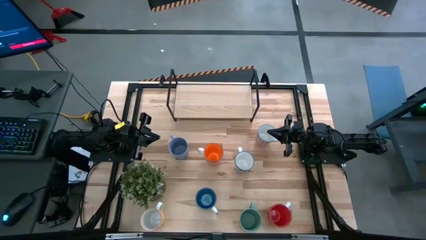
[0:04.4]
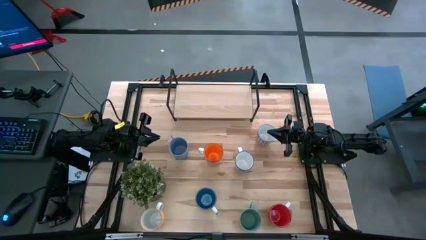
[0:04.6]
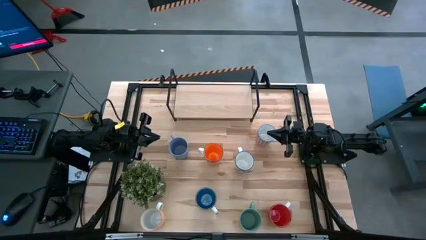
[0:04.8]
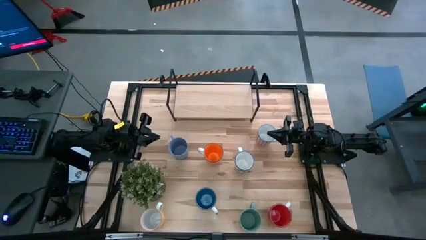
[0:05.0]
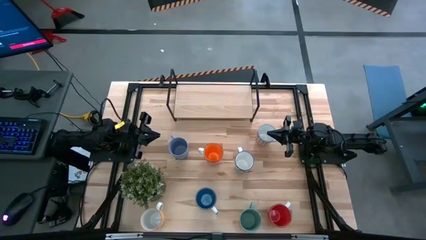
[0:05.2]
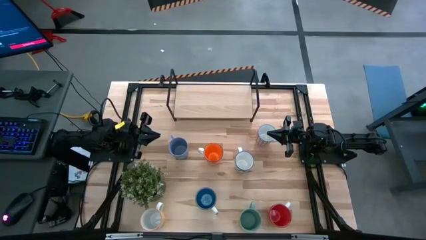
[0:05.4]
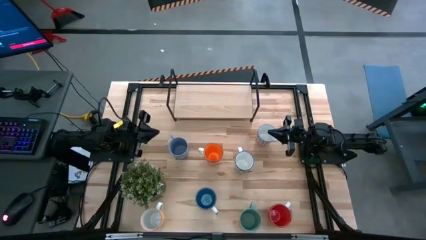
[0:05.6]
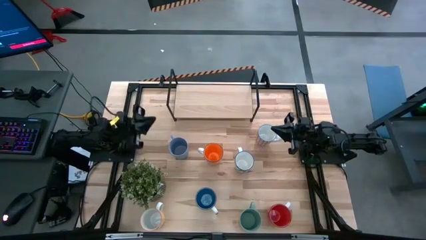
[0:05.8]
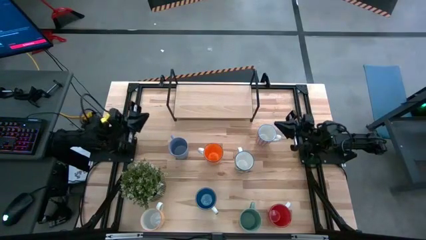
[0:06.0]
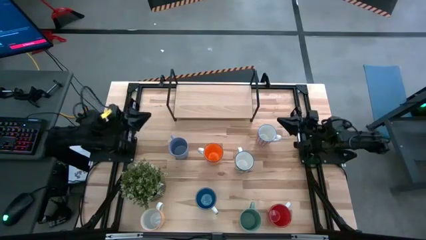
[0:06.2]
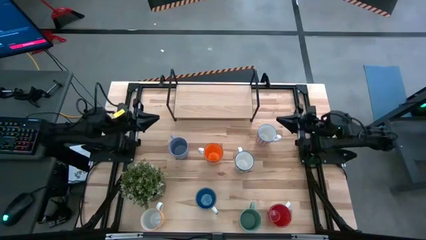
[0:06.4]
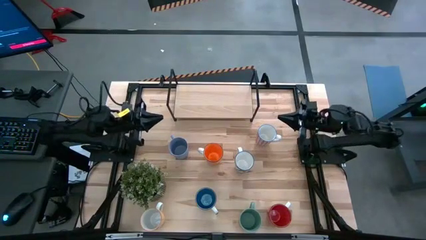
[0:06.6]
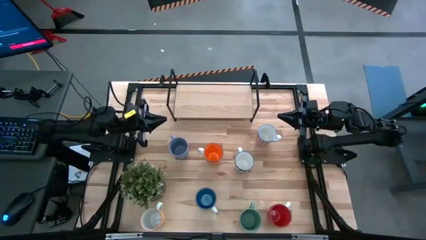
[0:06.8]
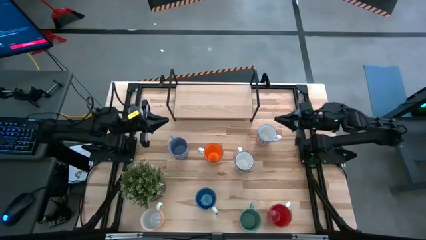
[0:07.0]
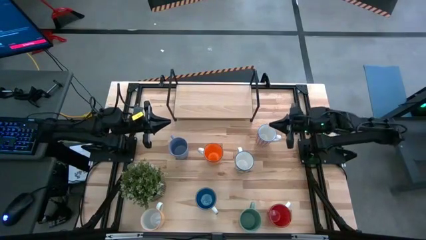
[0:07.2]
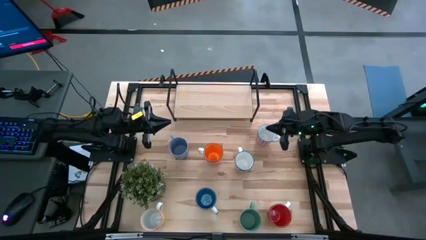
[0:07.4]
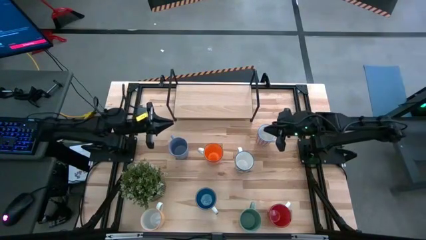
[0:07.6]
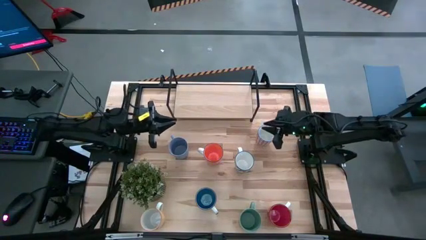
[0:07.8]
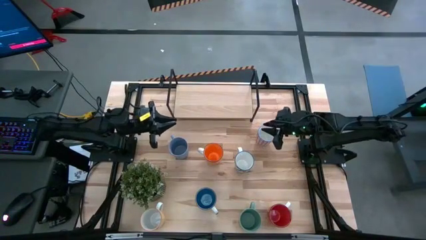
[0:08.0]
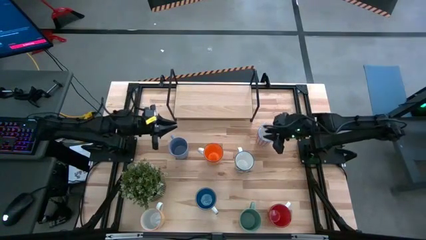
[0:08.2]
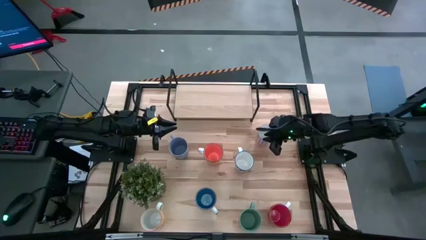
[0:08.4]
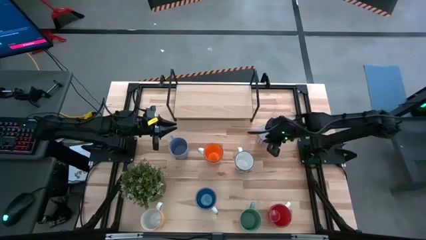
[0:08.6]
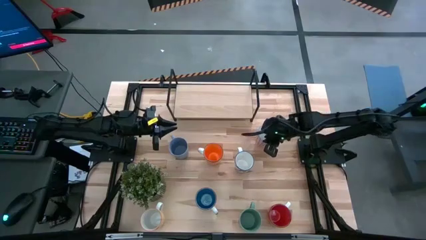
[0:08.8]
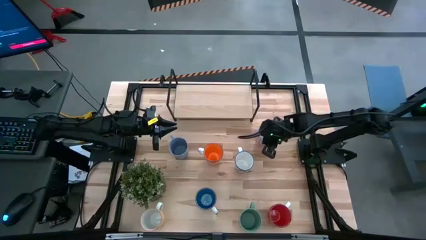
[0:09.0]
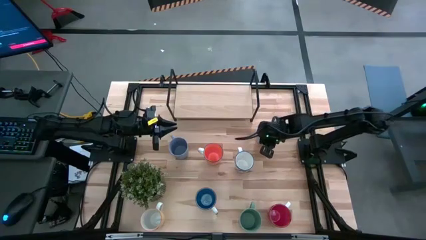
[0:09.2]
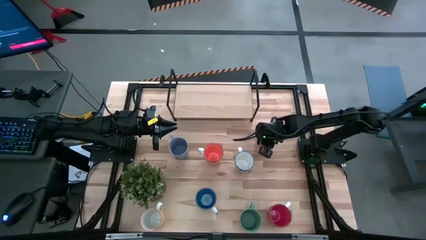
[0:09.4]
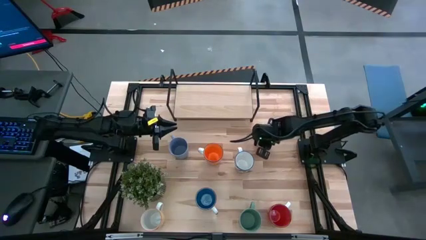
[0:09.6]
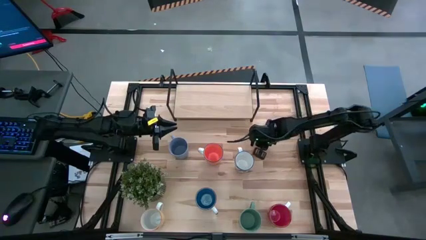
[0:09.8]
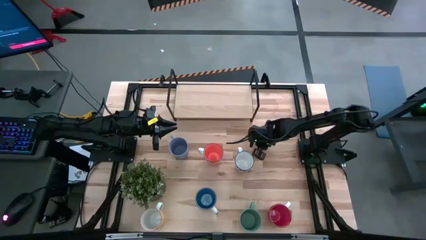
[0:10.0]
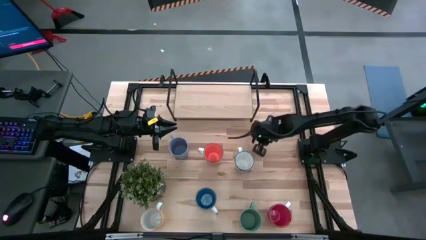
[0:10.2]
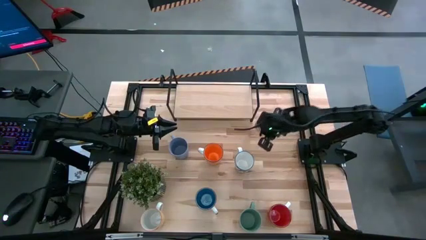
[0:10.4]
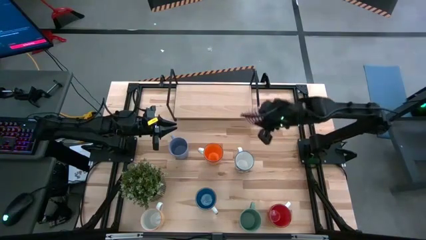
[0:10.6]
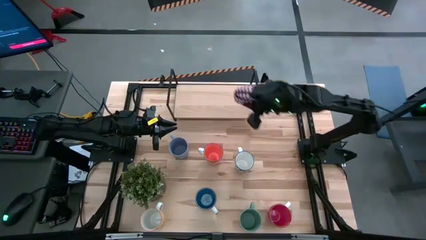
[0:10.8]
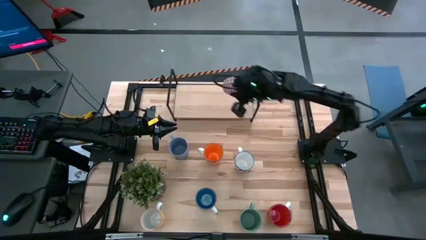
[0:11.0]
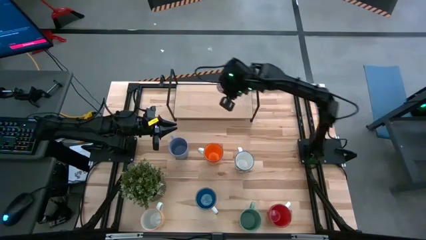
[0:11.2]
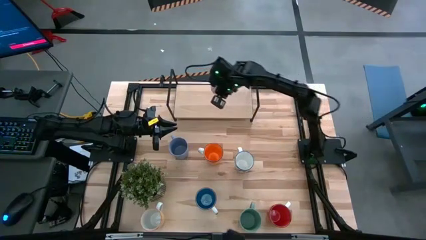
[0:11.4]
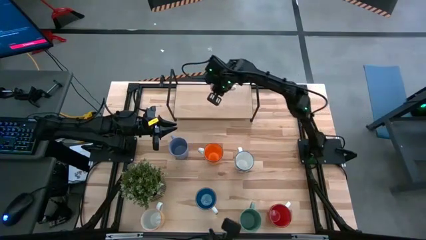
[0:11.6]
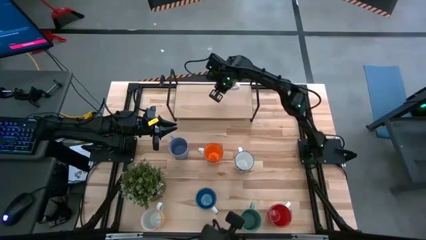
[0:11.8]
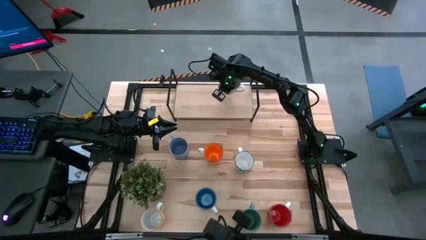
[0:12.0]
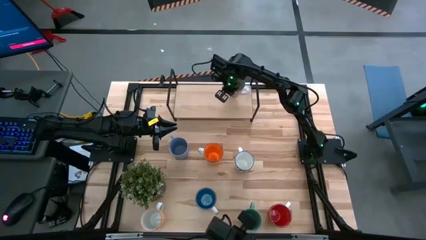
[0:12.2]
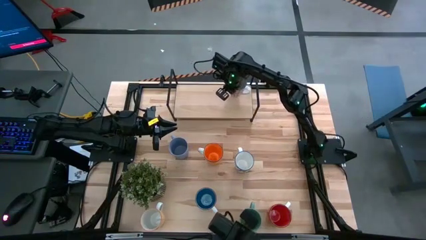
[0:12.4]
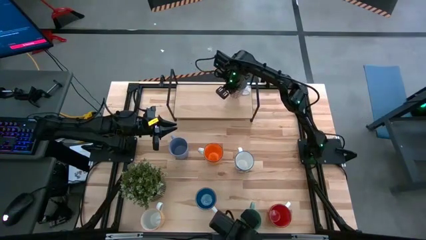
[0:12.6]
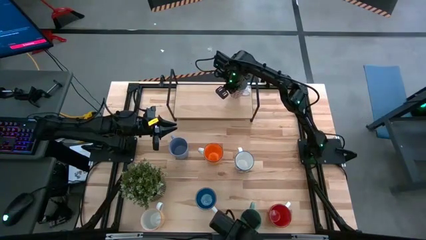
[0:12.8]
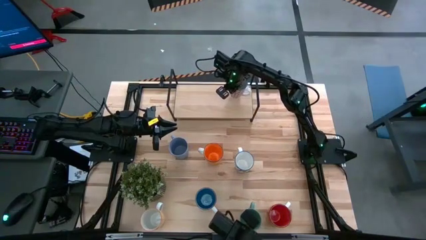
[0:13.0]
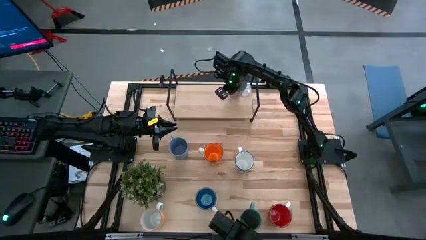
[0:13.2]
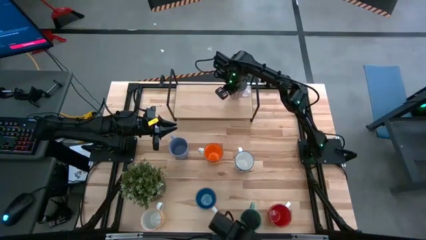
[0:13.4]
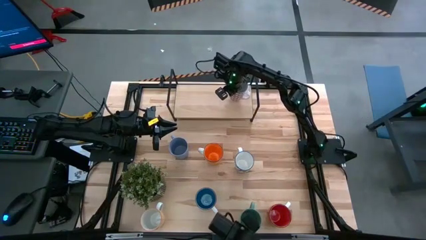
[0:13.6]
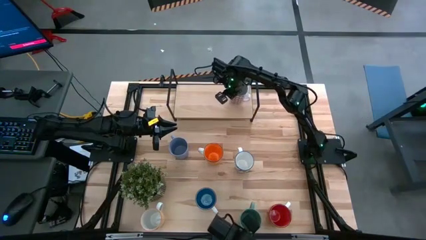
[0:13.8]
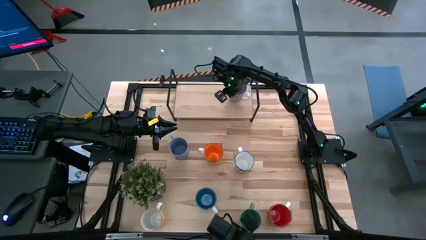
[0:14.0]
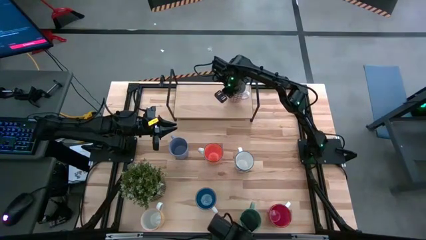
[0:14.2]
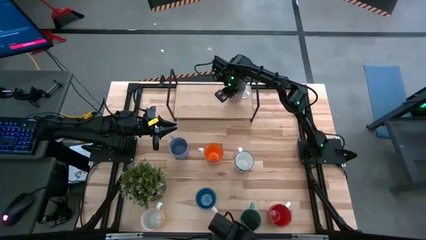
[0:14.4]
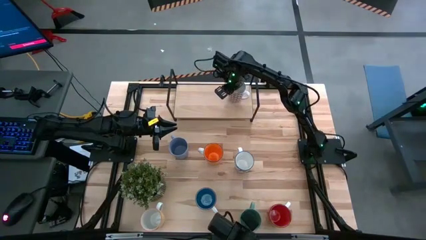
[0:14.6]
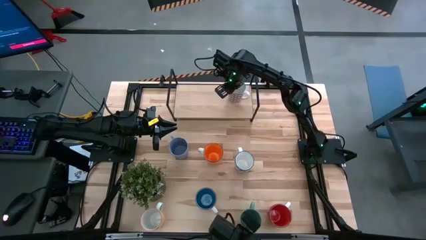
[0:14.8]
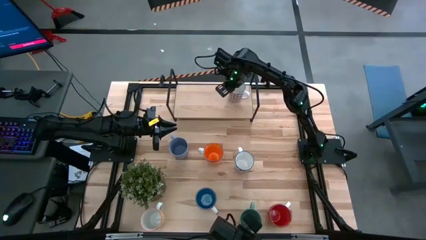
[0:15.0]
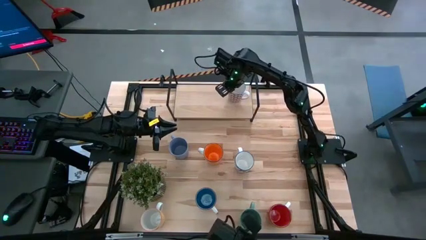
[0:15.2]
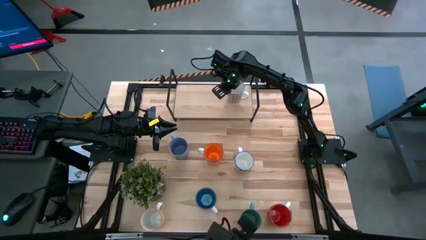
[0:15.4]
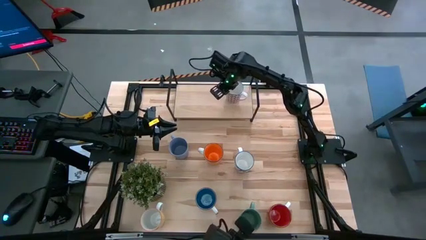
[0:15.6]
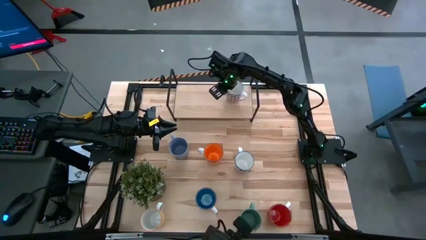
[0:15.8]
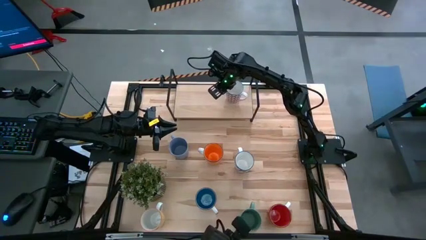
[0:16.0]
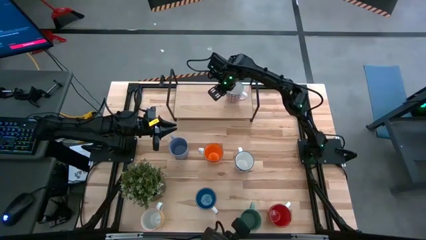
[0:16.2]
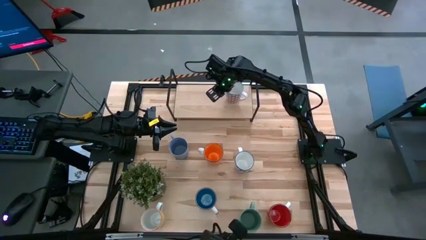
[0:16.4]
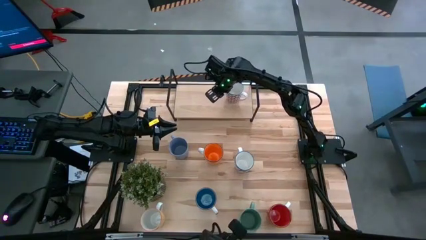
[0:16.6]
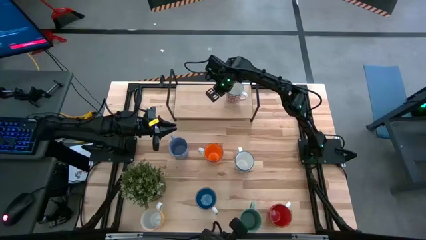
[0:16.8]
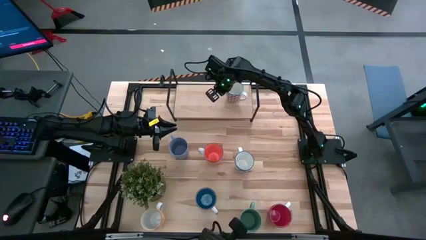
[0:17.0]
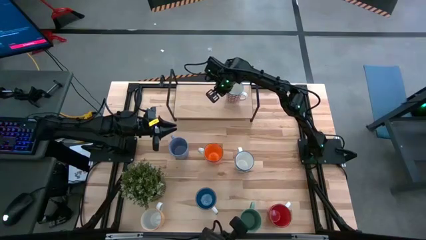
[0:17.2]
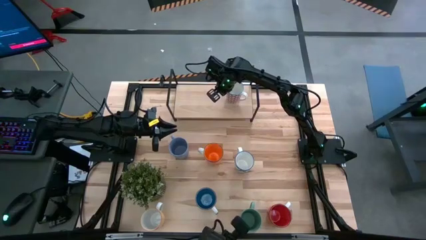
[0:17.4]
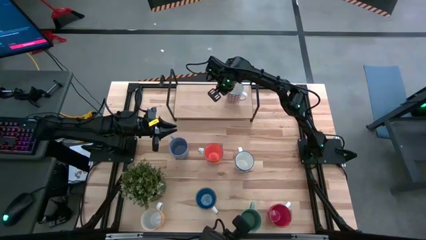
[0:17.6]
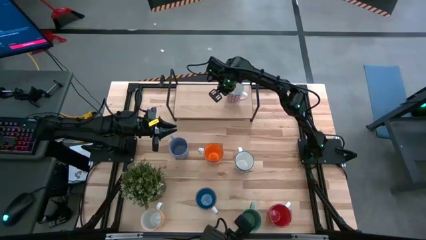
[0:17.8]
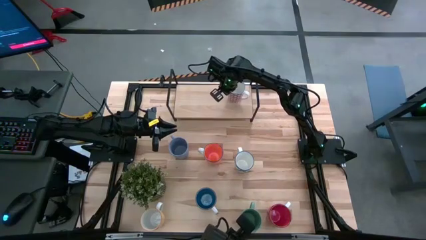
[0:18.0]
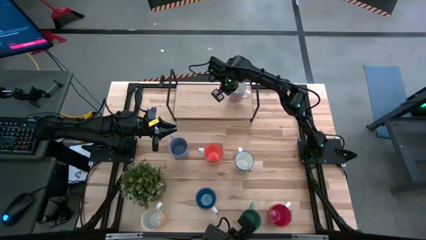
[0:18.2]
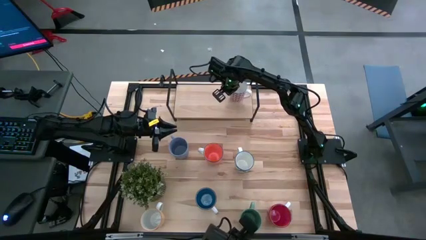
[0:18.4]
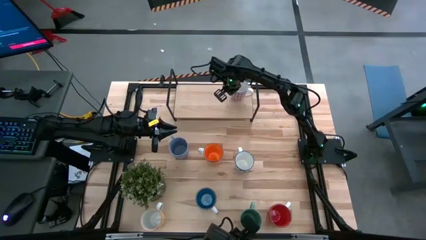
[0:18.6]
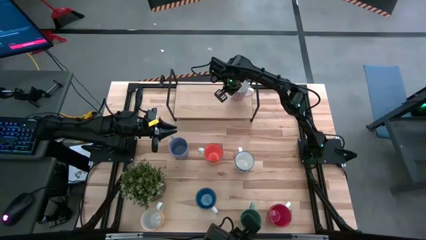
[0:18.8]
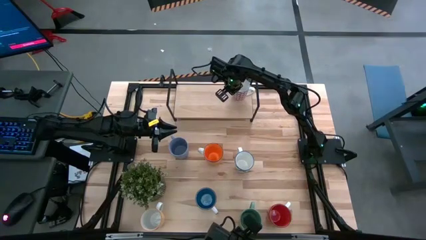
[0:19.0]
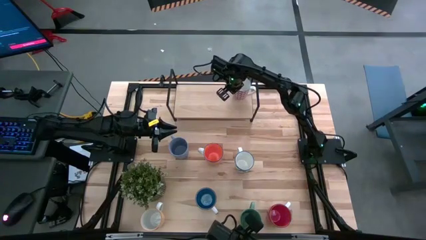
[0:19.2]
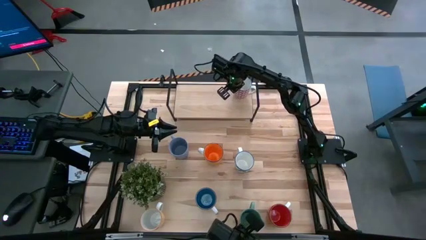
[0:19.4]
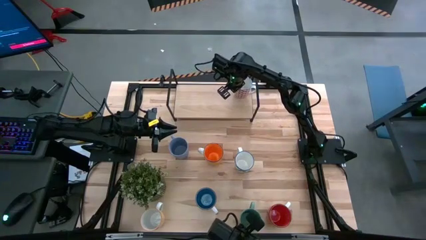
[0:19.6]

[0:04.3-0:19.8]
Task: Place coffee mugs
Put the red white patterned mug on the shelf
